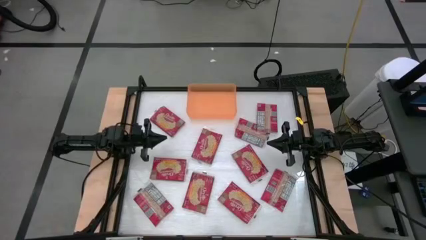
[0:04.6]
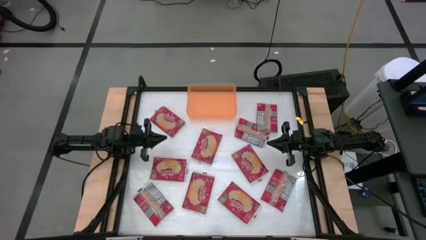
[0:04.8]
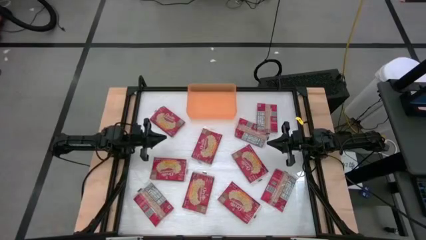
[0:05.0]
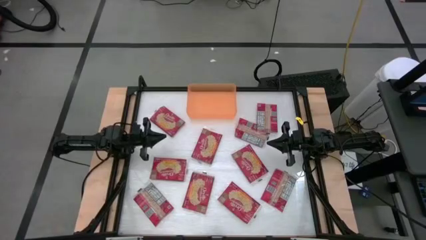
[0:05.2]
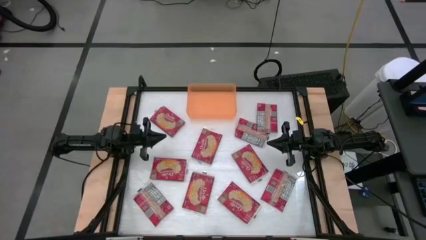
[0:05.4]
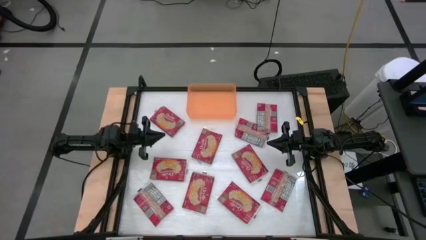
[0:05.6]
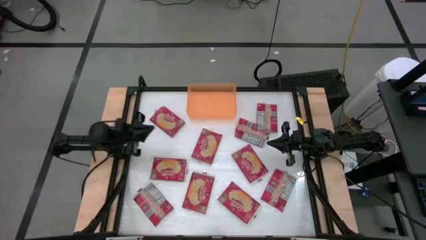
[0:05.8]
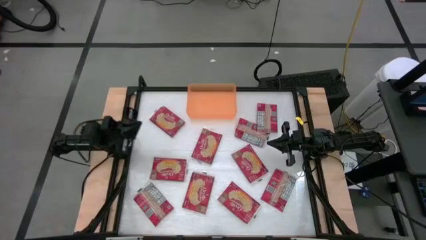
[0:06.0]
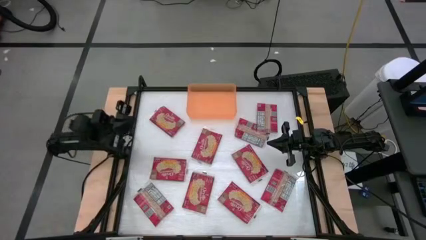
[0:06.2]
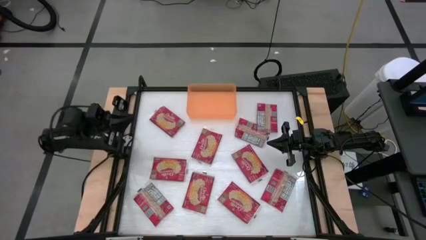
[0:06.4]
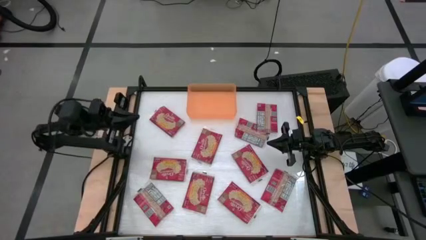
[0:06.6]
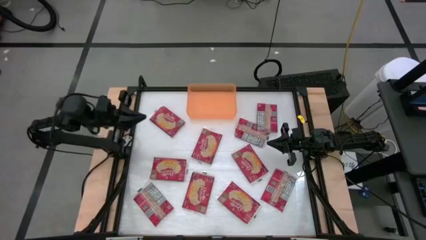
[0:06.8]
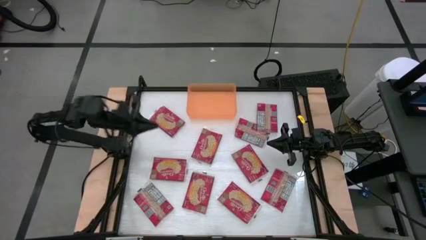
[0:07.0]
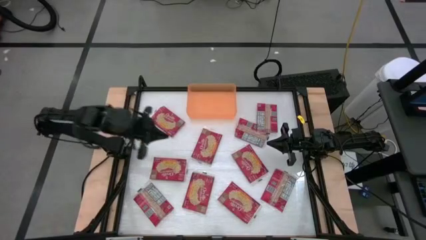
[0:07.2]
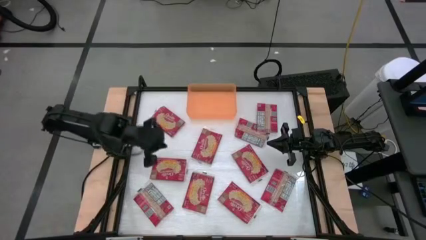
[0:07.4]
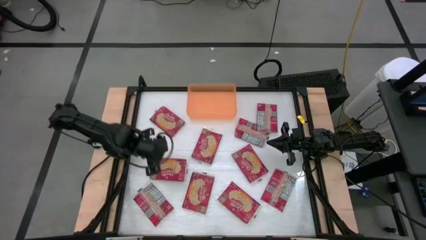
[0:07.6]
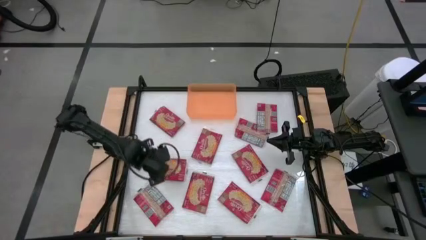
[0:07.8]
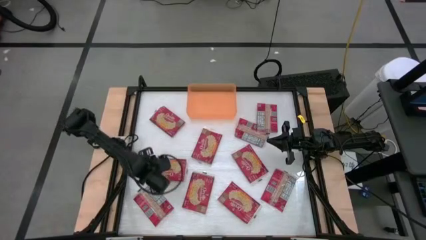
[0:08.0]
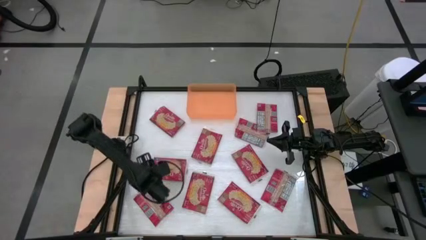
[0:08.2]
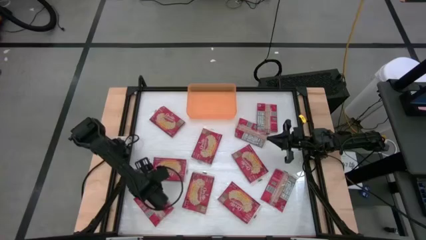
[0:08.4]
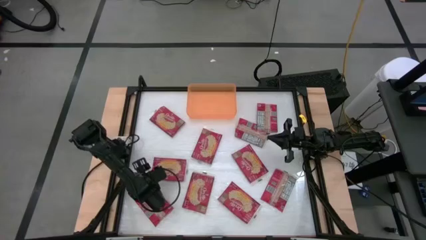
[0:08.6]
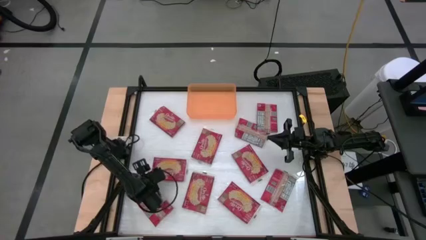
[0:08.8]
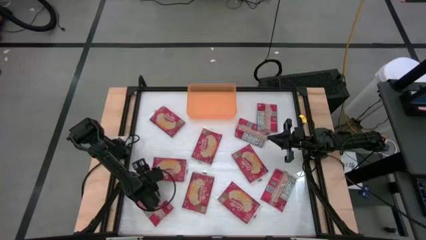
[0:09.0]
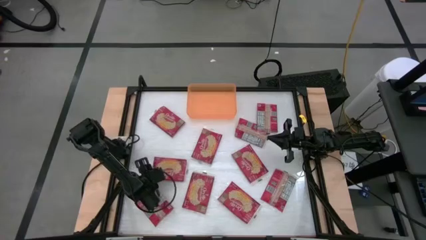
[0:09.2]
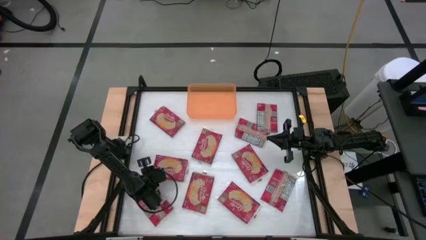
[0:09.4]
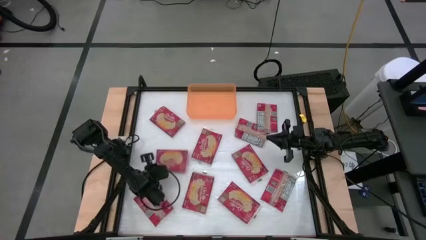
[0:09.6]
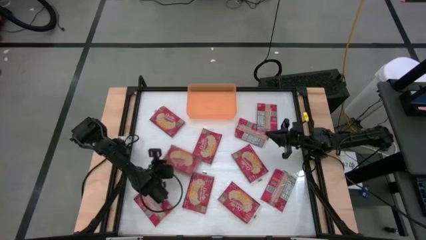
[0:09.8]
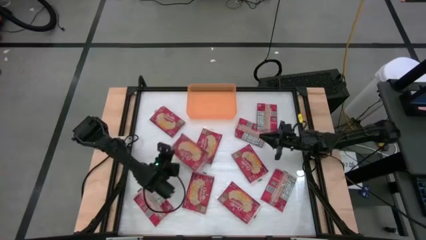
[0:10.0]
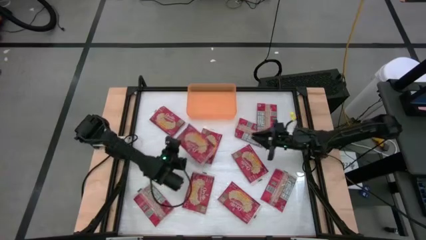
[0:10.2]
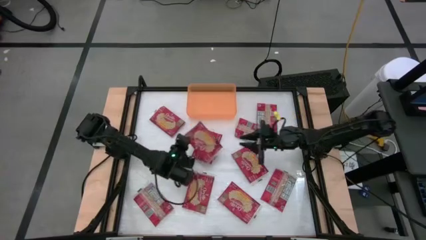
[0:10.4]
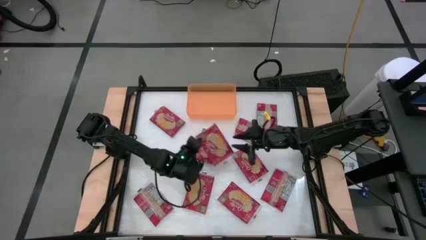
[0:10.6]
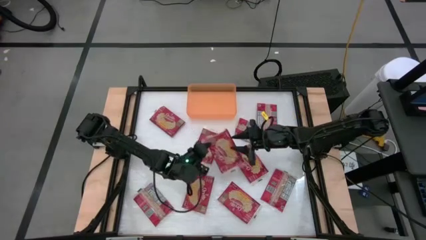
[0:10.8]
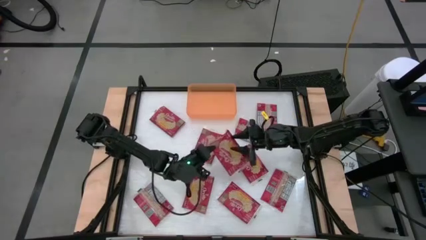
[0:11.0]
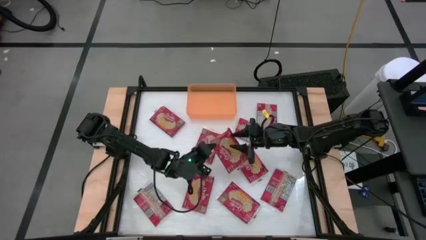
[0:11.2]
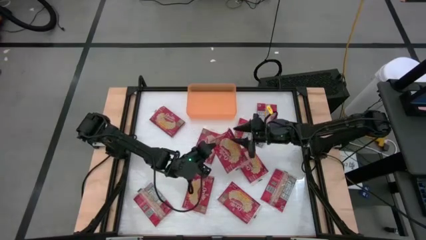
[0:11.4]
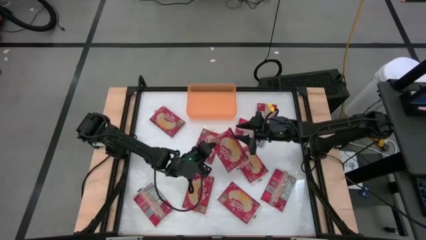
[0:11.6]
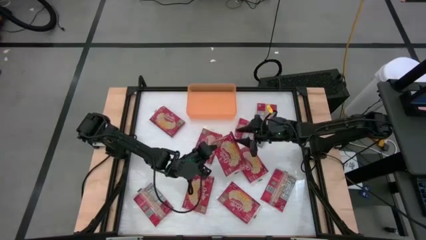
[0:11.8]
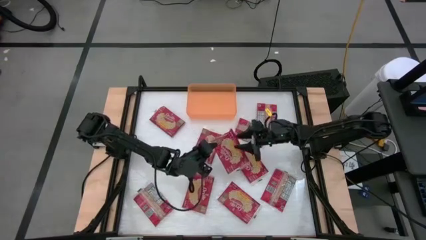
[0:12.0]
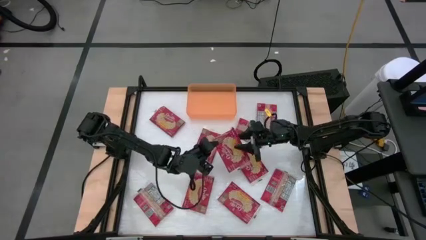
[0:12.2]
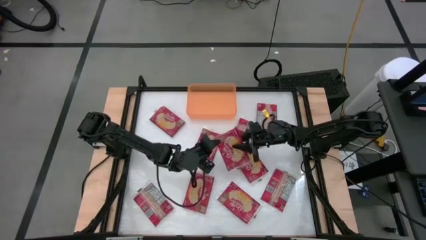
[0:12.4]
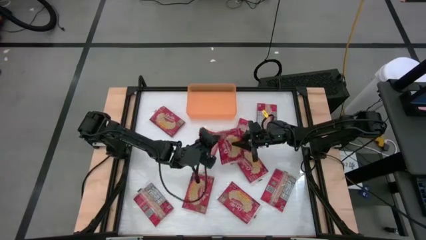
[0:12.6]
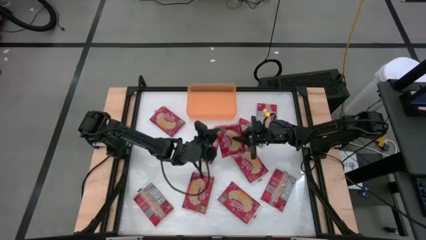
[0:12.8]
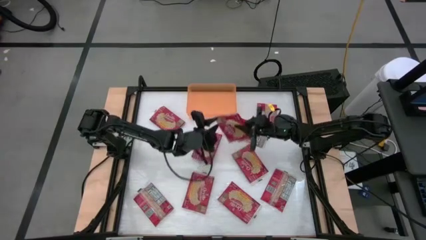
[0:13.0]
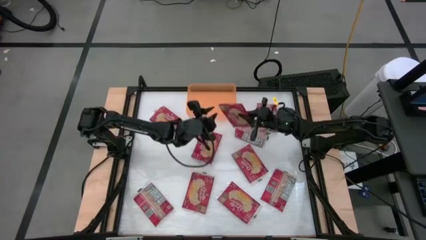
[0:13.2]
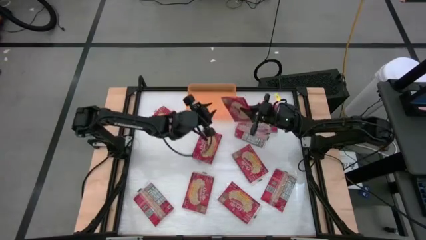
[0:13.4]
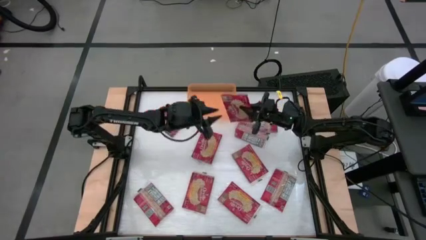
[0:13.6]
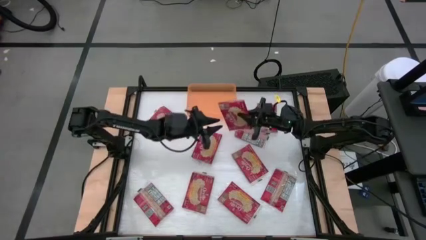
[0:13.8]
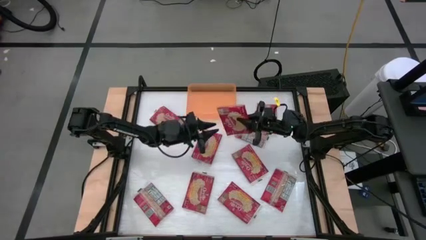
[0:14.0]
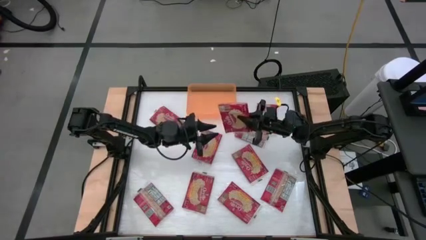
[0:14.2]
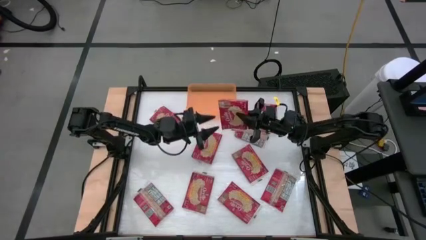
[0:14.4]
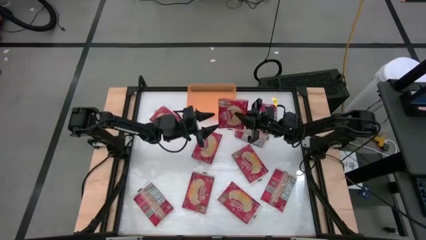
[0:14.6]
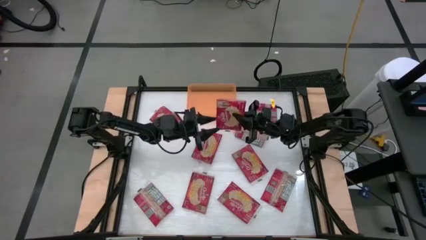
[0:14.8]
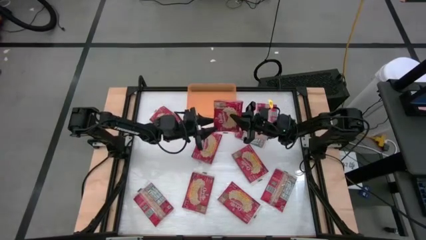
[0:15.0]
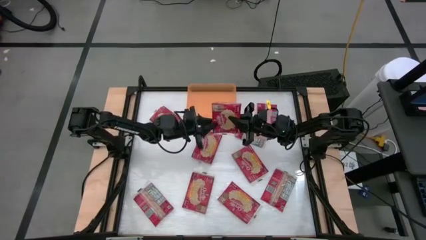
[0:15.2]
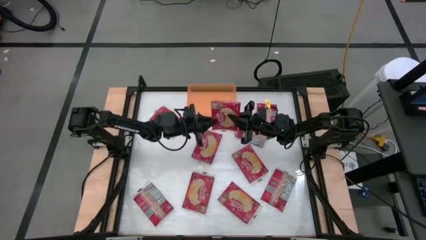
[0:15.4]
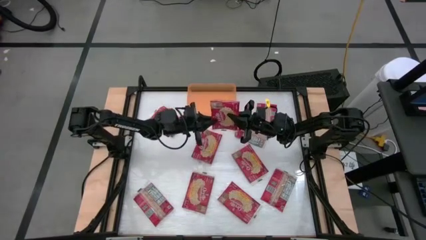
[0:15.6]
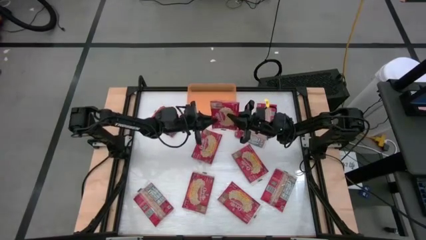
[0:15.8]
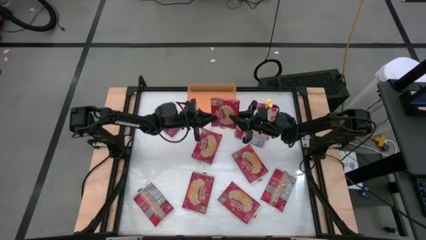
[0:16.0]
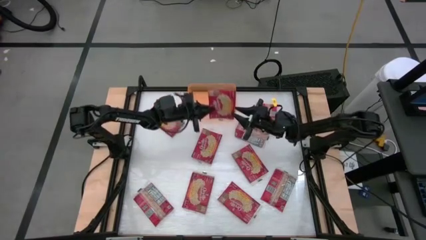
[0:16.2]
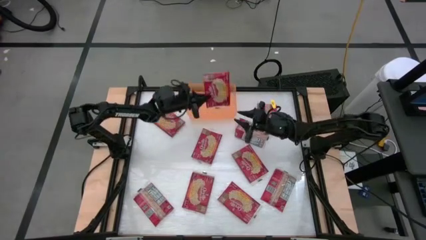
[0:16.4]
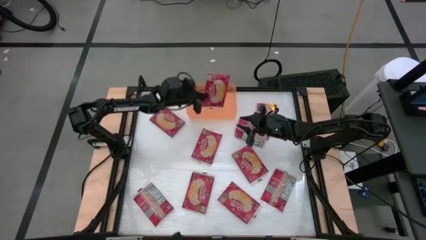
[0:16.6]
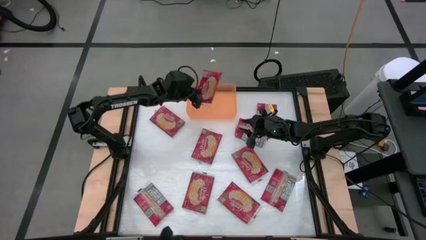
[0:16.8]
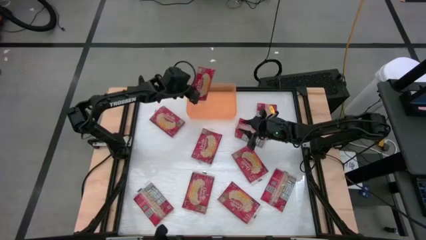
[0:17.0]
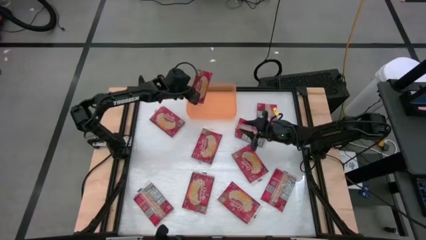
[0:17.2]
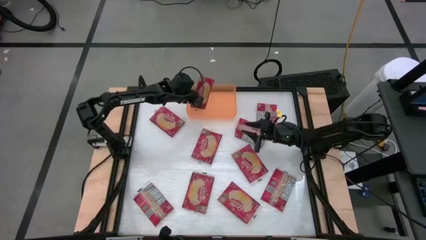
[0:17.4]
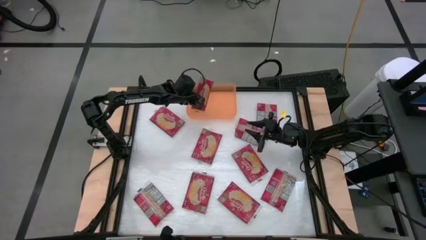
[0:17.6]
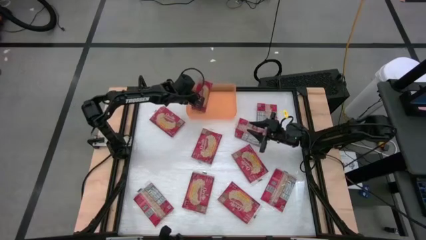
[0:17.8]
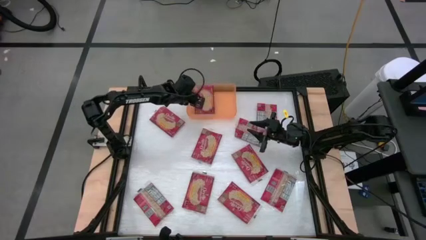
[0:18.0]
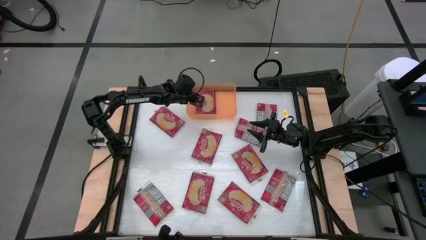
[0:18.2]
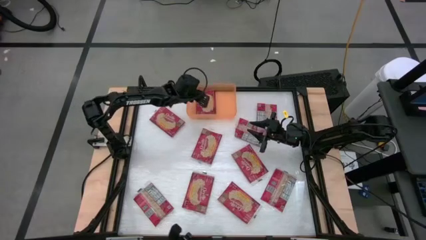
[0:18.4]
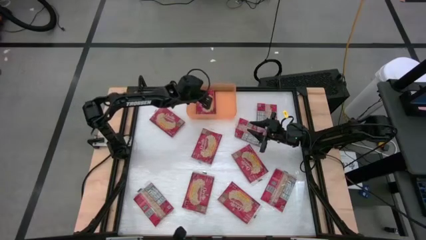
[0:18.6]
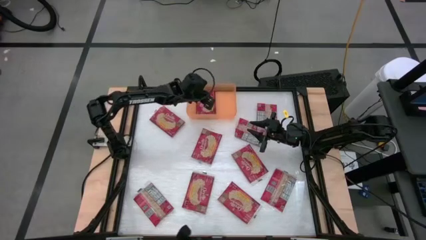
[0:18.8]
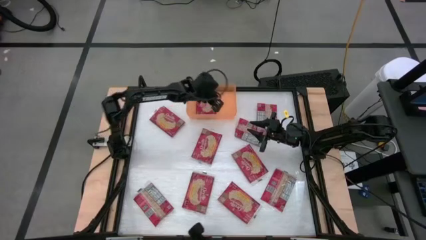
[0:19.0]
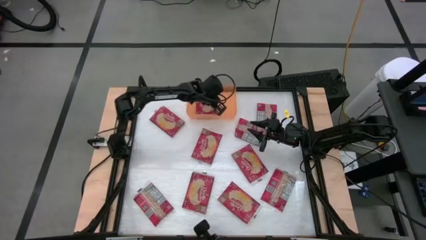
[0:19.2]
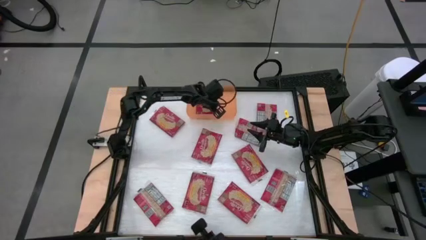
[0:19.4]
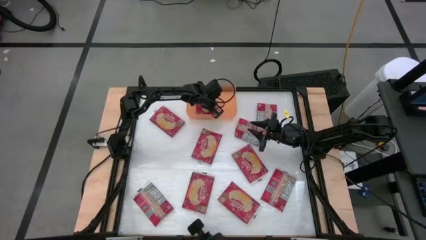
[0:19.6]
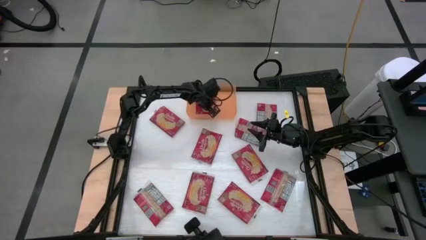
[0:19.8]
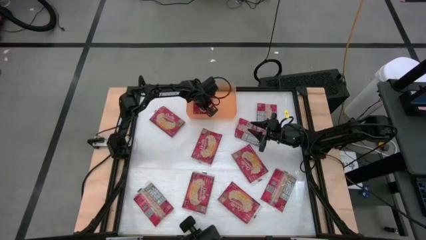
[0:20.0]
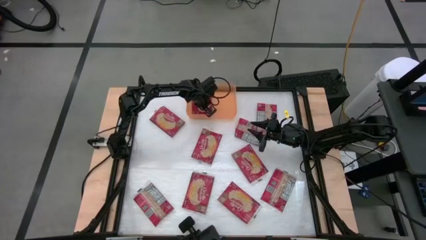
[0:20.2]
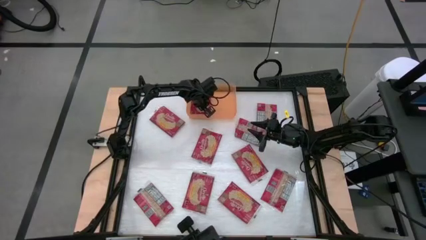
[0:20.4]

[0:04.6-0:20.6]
Task: Sort popcorn bags into baskets
Put the red popcorn bag into the orange bin

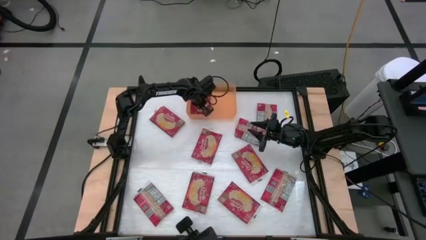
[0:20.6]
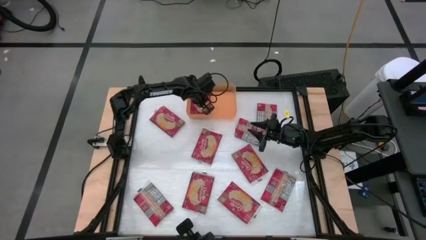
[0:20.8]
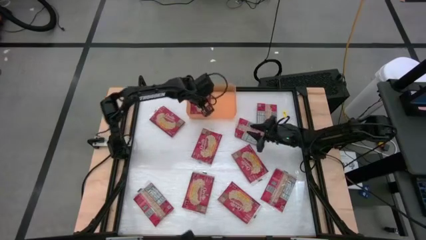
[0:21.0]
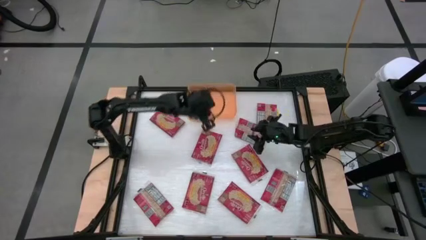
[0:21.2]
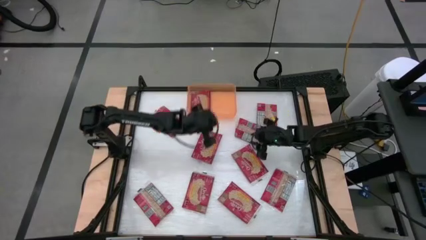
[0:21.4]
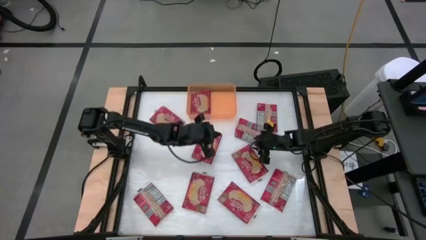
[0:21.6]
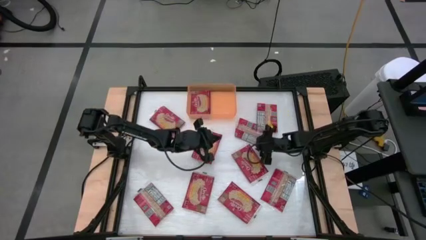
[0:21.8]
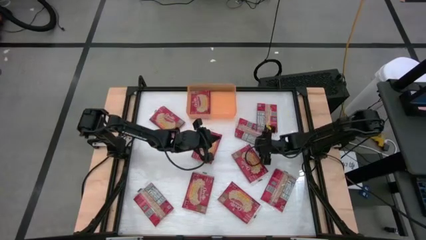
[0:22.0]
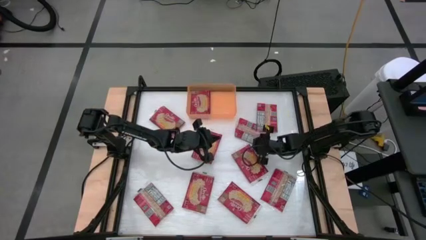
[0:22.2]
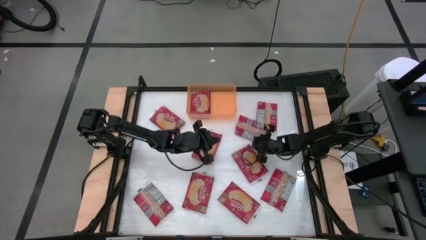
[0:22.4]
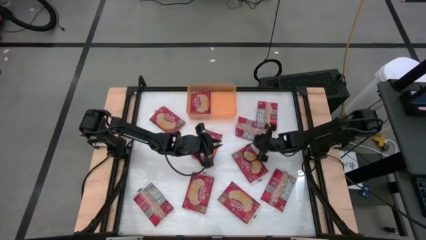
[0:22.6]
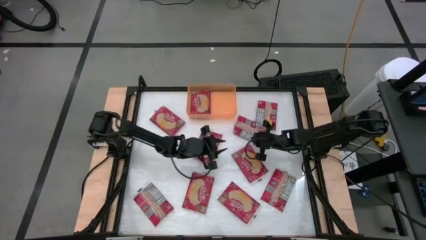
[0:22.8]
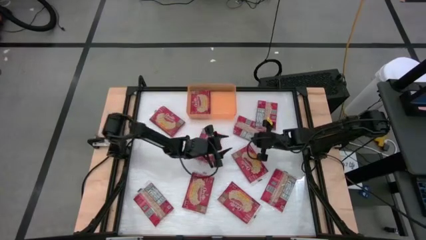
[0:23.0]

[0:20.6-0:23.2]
Put the red popcorn bag into the orange bin
